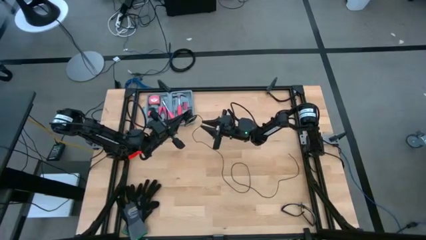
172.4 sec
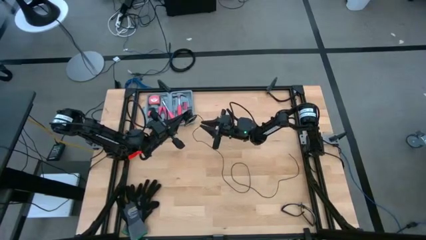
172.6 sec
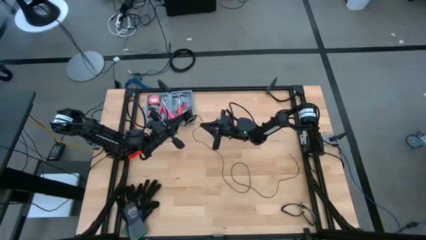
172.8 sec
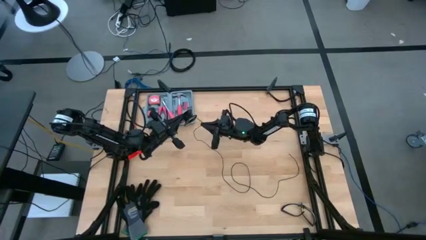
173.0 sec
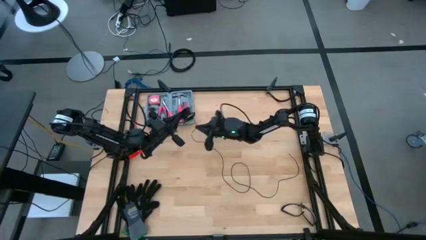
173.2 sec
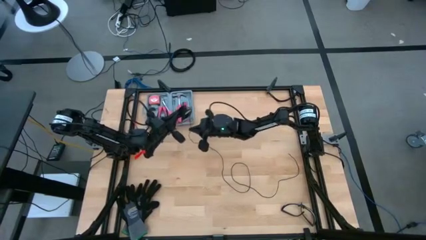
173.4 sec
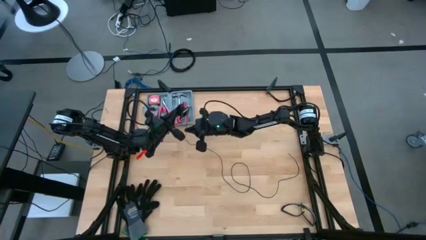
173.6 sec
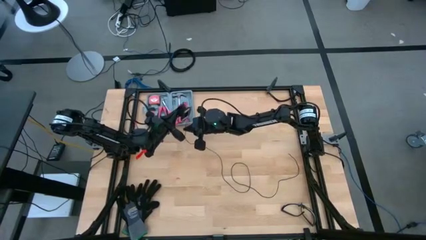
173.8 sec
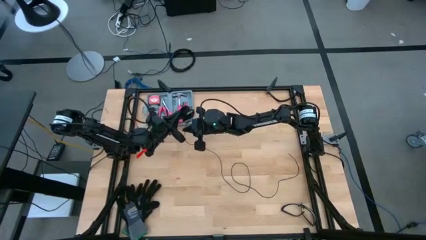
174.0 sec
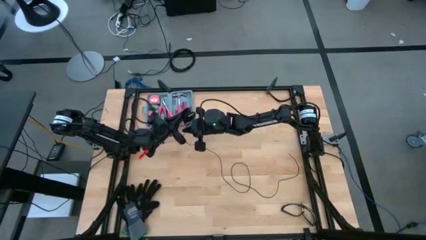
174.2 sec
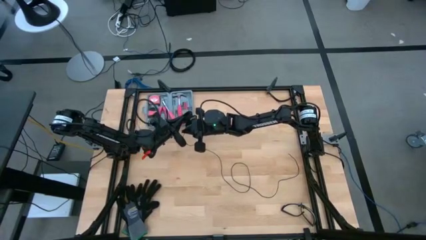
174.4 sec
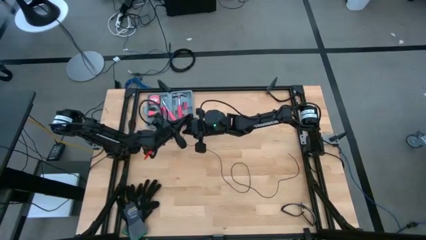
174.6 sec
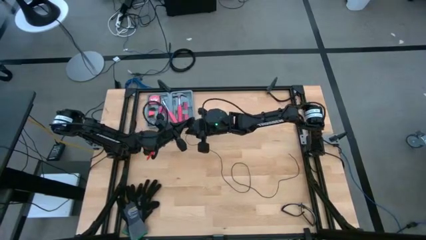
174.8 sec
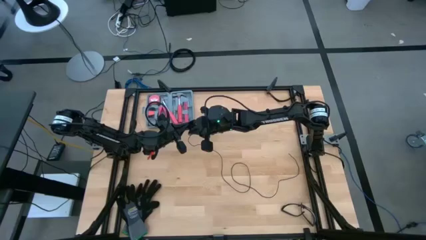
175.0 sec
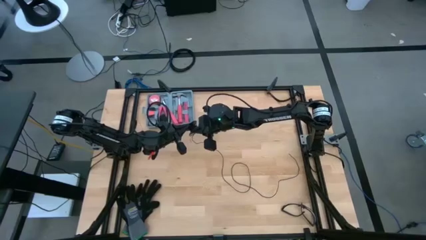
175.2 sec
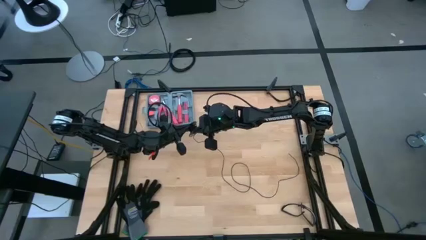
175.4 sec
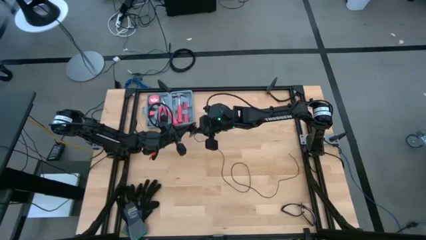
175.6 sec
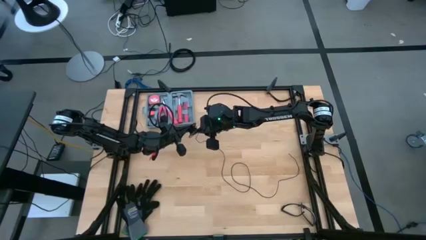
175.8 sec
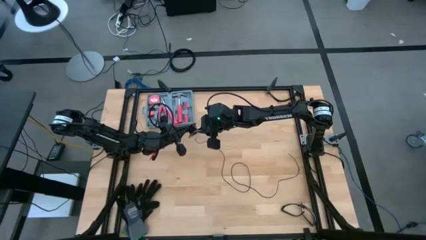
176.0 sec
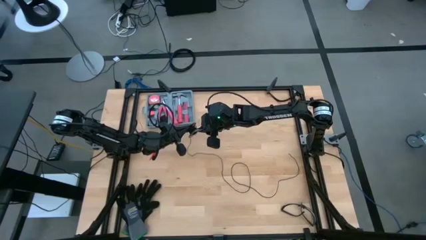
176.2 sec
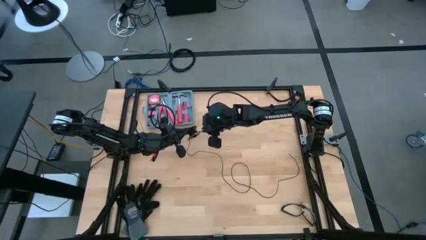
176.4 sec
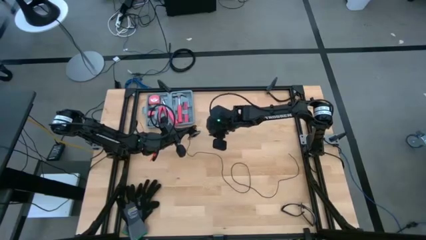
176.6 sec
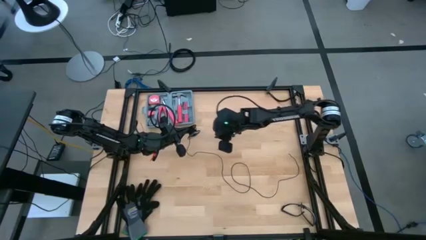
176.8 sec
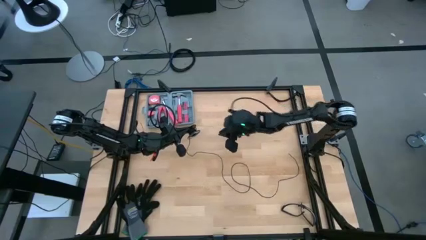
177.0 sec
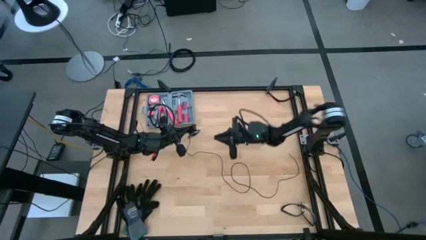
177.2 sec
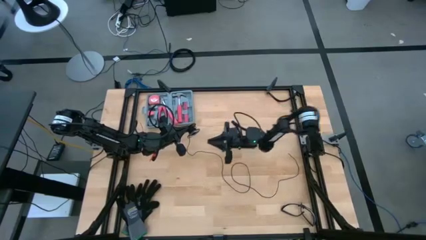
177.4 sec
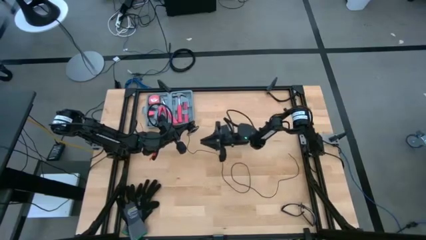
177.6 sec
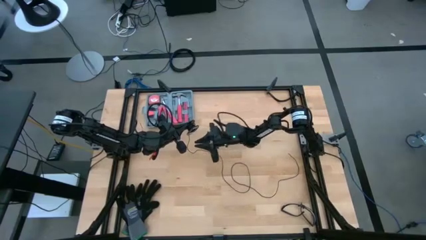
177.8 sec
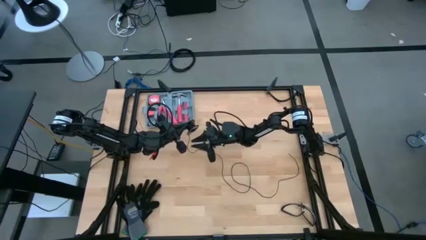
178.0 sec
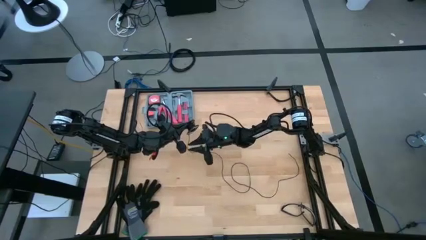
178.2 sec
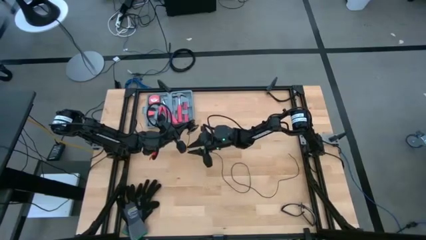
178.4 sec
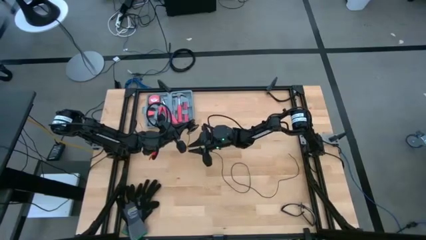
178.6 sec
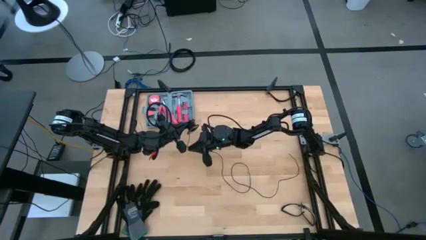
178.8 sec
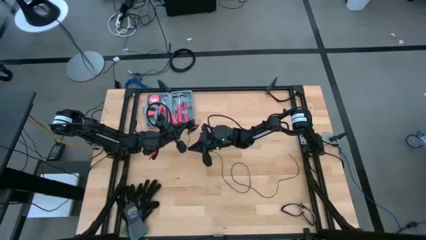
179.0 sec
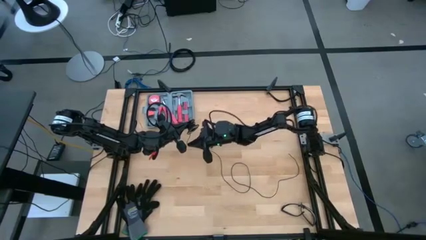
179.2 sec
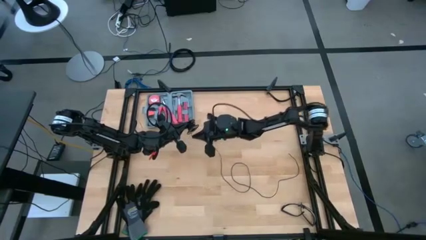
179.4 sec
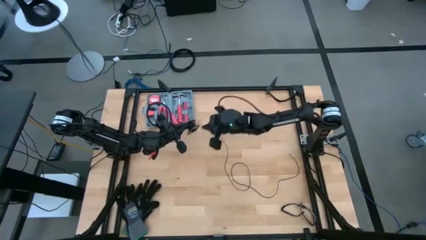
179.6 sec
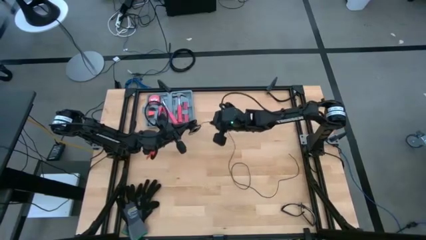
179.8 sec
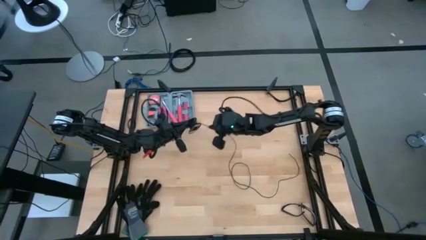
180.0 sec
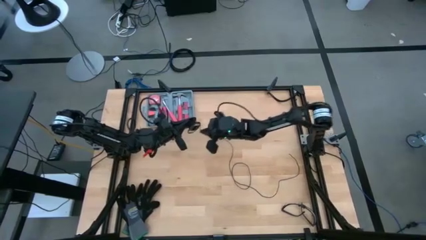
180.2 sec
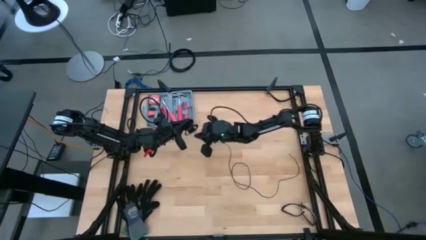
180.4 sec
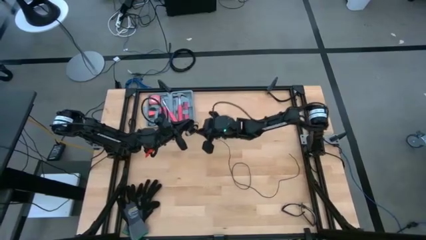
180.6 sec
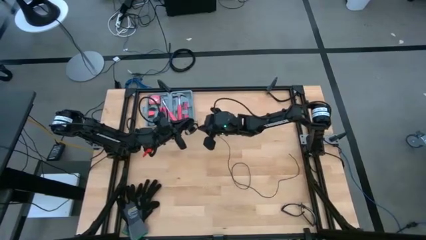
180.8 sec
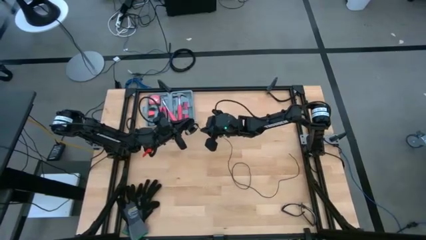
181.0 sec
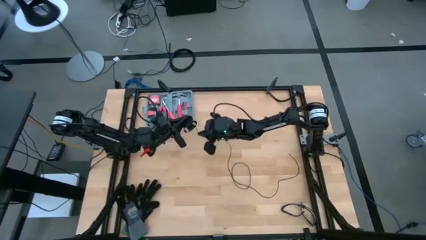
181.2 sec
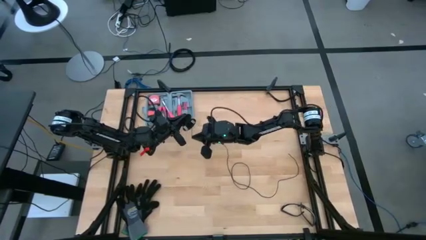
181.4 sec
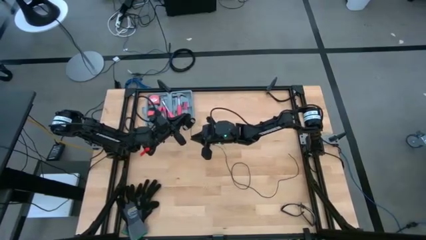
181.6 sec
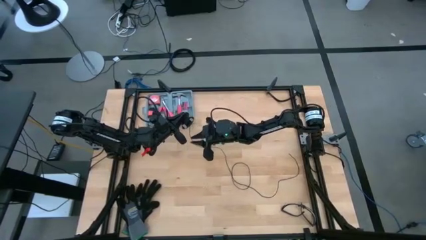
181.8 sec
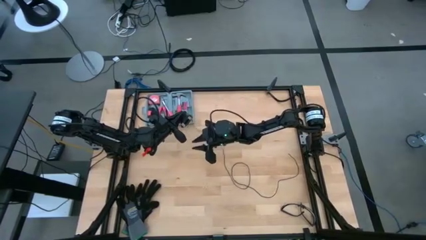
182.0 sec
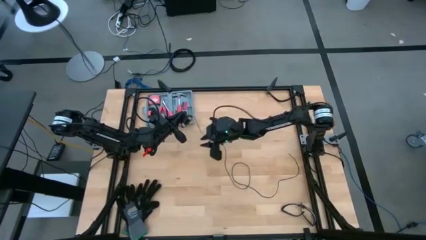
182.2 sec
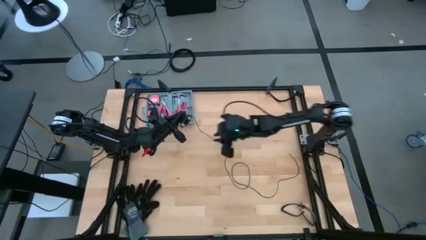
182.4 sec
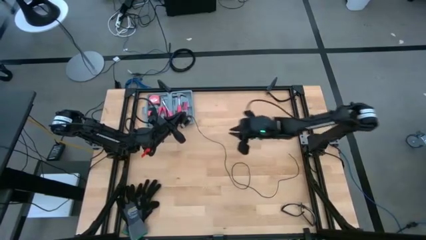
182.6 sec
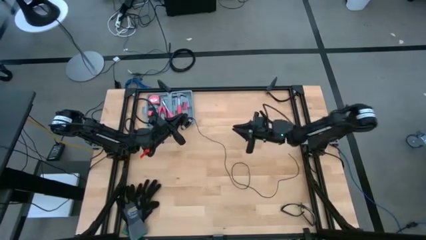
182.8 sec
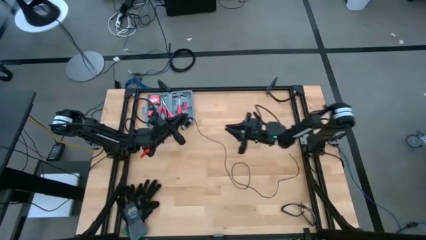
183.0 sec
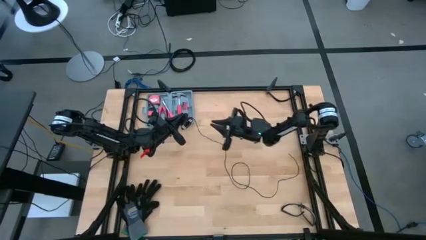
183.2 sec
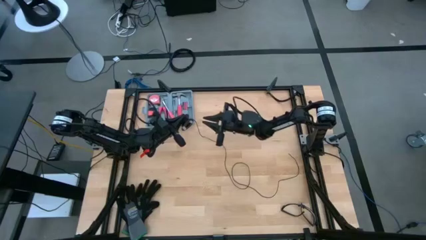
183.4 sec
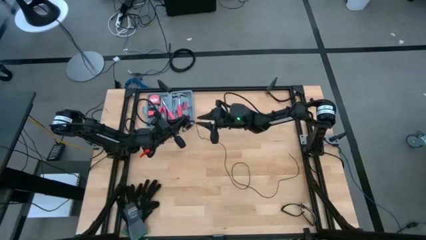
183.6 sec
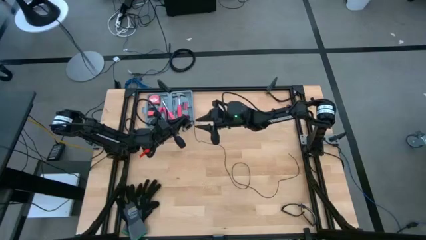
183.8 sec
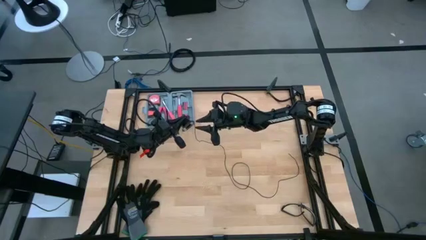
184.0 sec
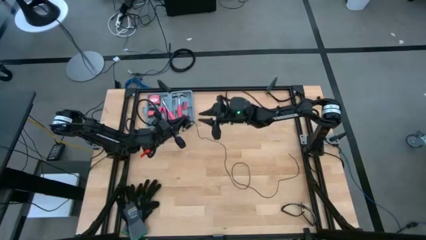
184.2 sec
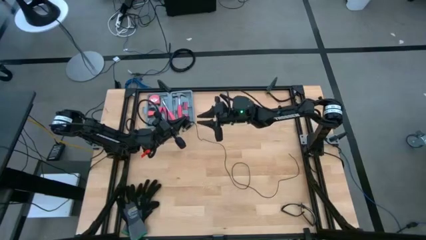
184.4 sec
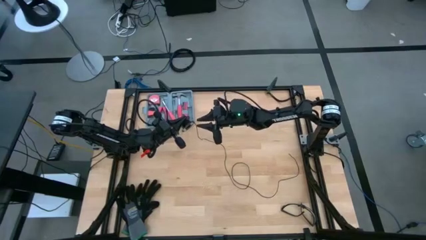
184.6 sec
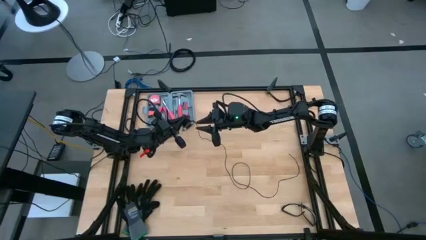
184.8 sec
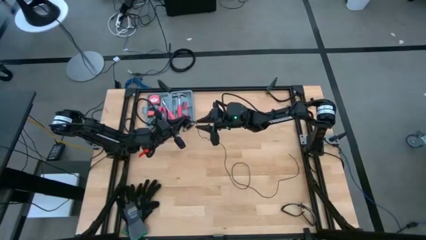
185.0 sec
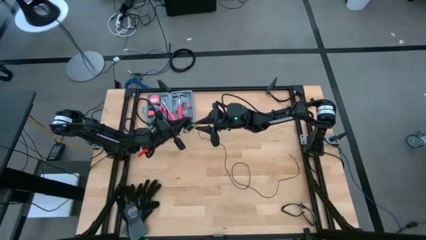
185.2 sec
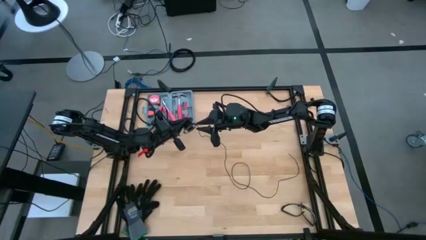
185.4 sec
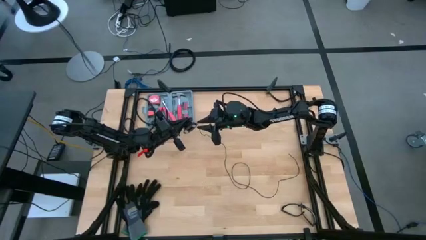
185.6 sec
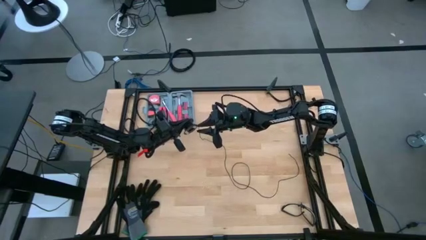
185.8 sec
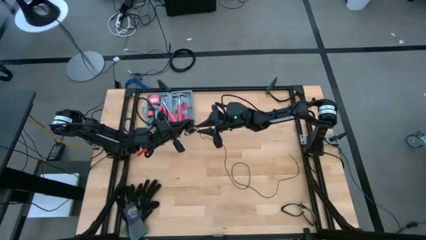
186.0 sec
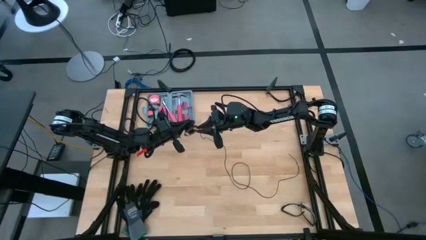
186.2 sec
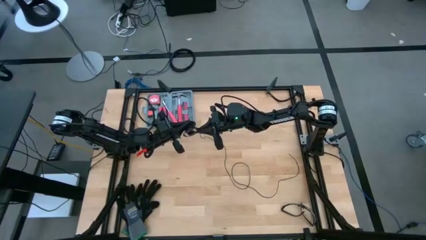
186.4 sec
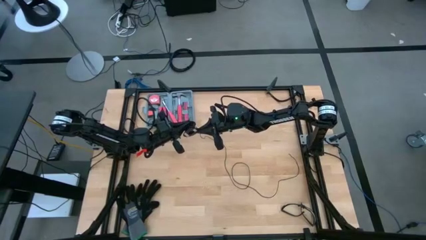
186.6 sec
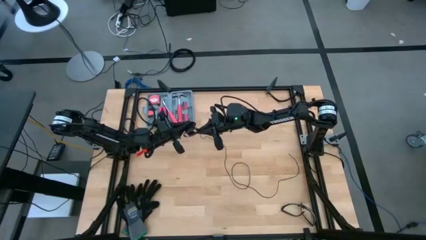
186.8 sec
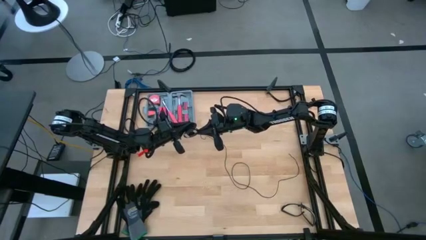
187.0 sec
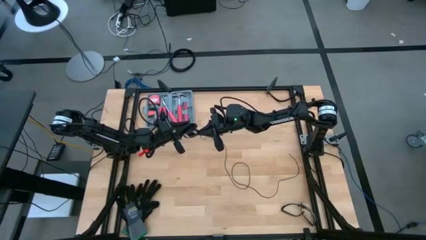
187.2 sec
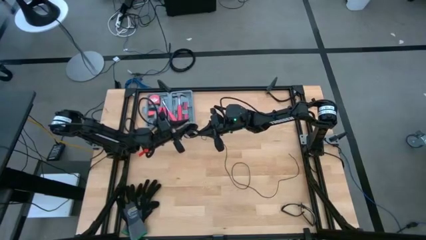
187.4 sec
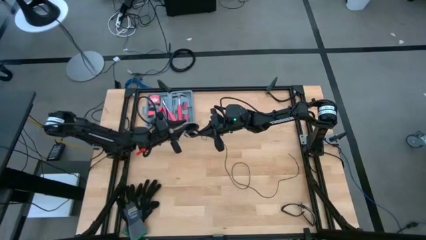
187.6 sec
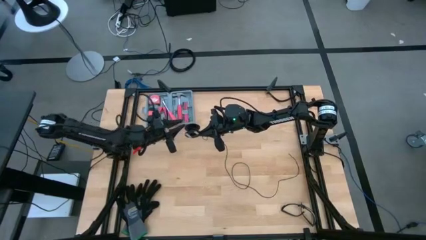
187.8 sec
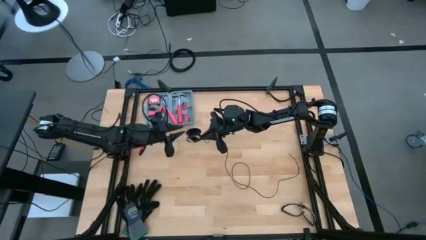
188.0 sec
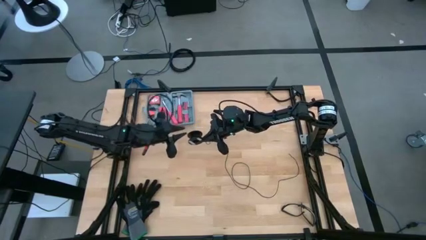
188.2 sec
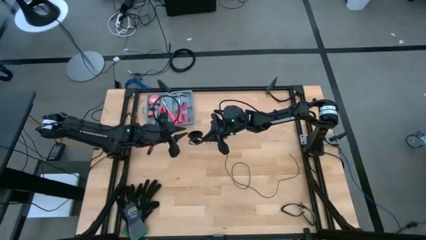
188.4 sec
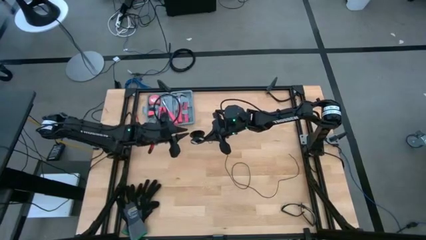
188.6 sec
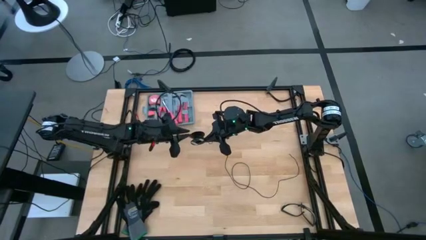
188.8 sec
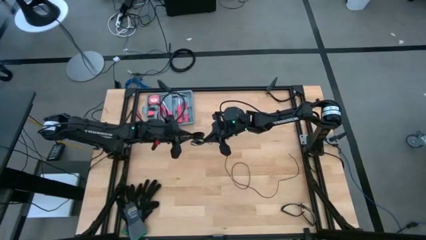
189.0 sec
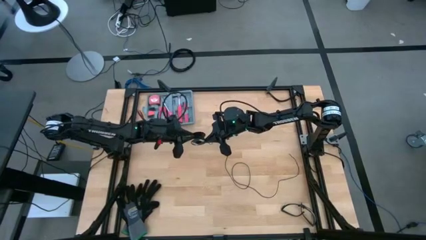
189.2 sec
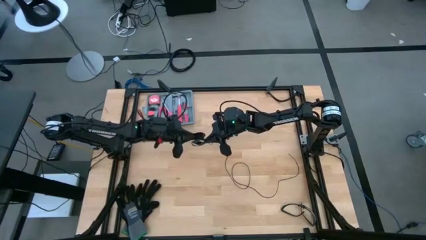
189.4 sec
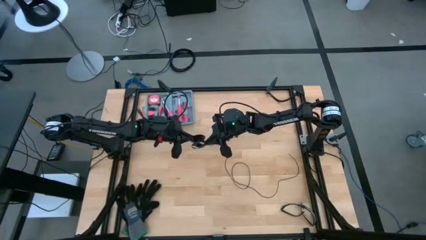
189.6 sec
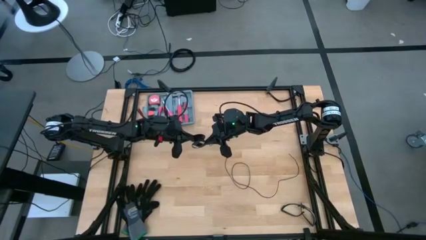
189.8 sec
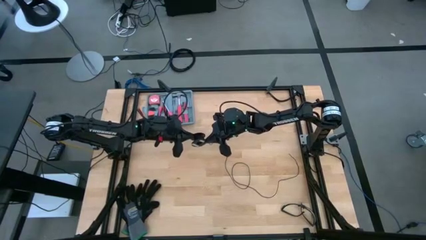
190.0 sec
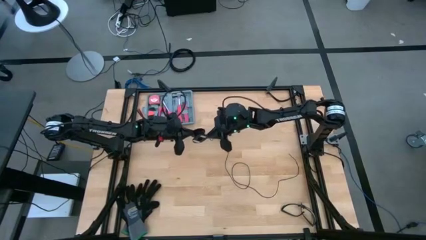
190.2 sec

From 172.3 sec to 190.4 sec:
Task: Coil cords
Coil the black wire onto the spool
